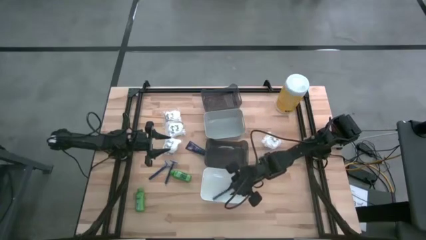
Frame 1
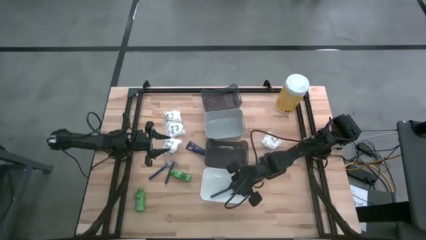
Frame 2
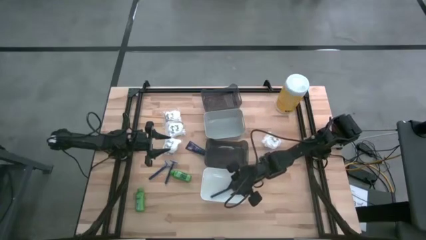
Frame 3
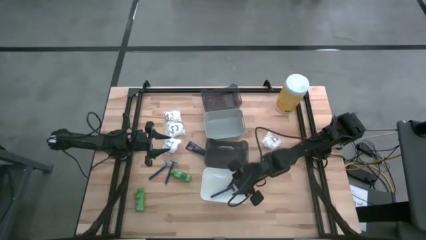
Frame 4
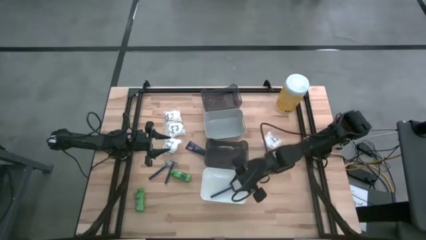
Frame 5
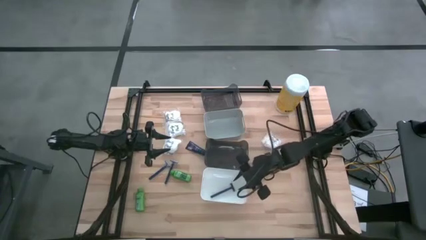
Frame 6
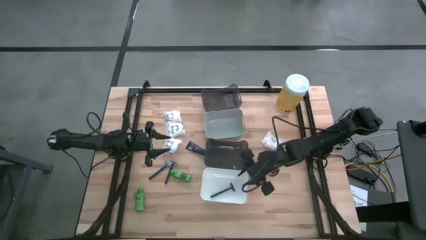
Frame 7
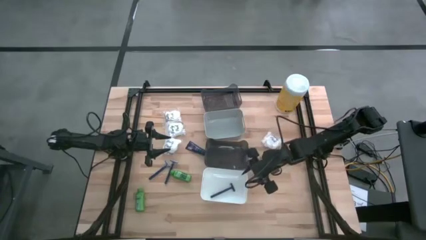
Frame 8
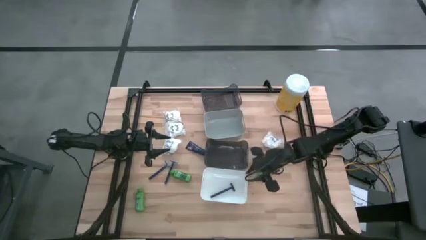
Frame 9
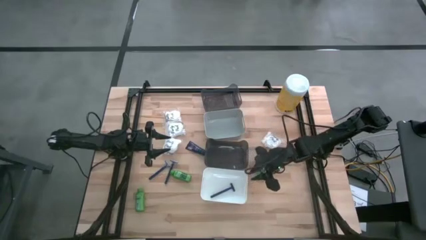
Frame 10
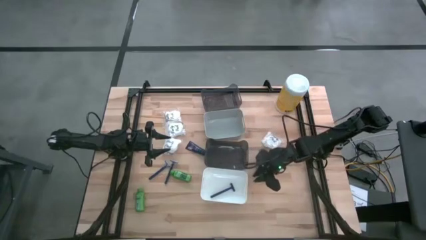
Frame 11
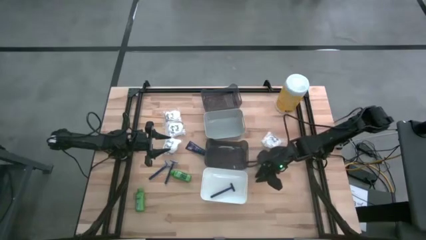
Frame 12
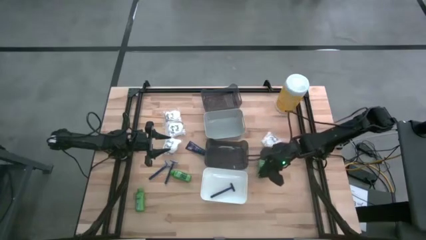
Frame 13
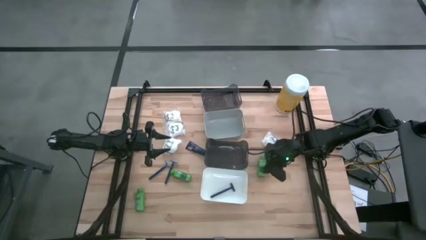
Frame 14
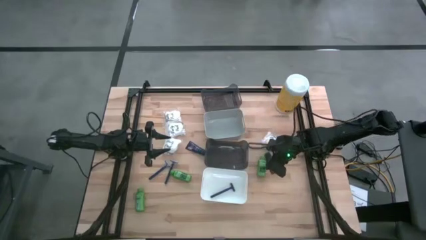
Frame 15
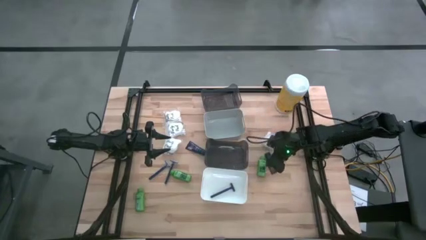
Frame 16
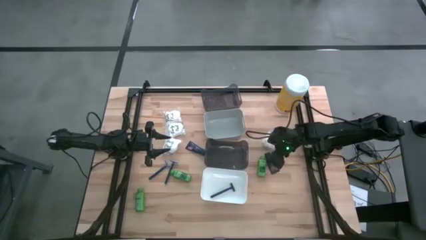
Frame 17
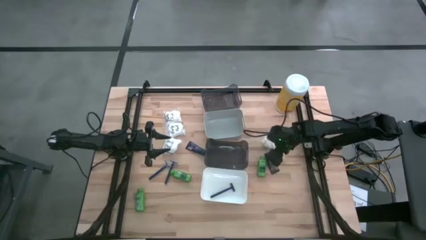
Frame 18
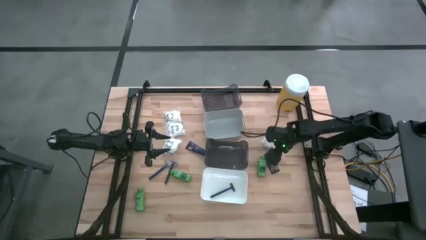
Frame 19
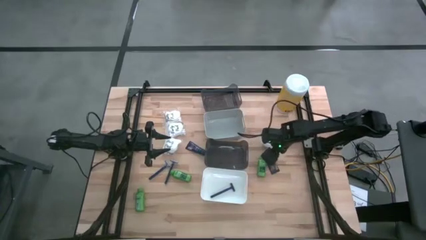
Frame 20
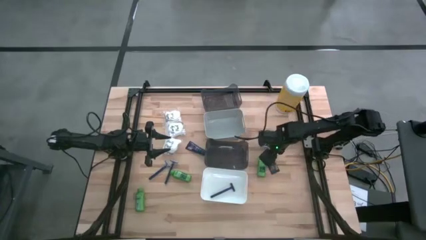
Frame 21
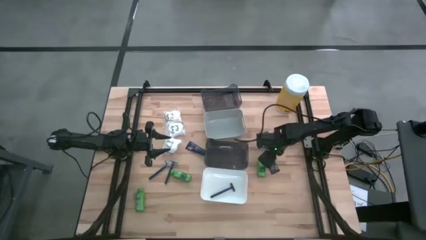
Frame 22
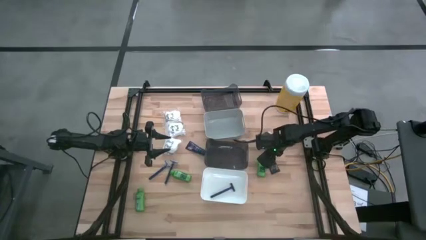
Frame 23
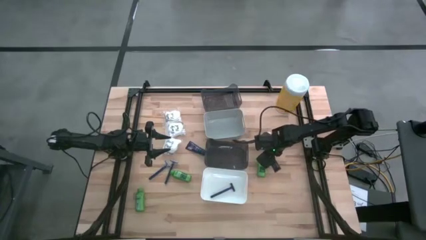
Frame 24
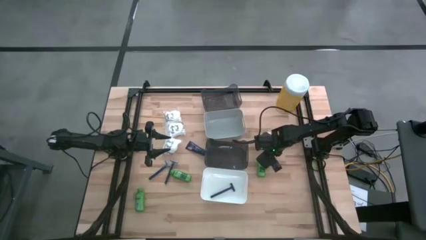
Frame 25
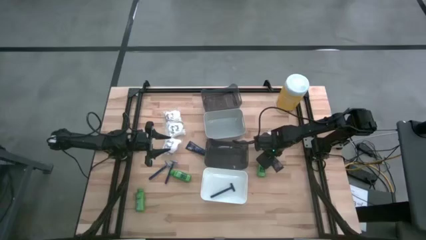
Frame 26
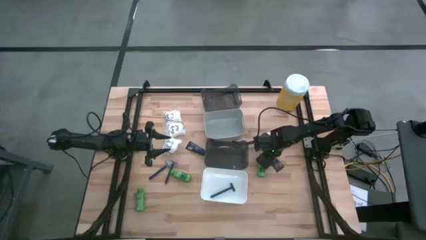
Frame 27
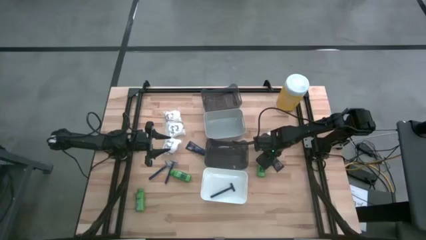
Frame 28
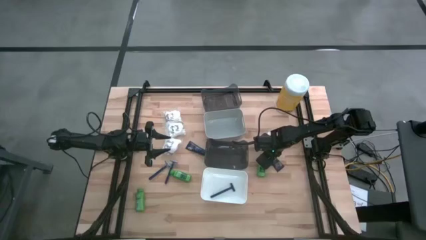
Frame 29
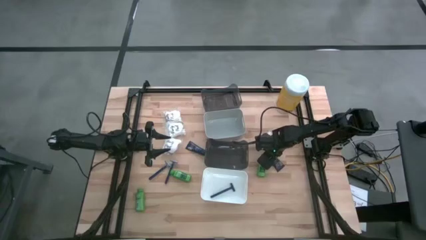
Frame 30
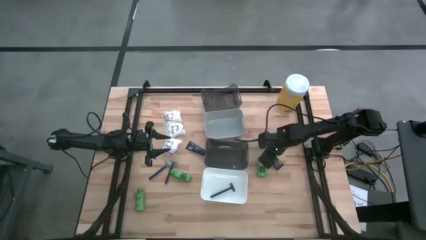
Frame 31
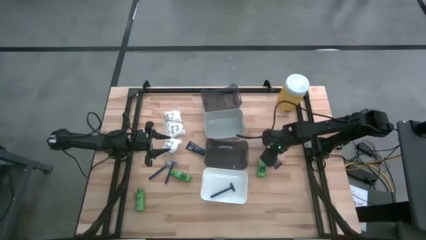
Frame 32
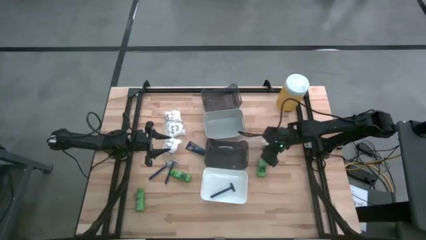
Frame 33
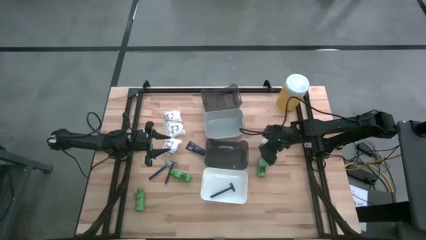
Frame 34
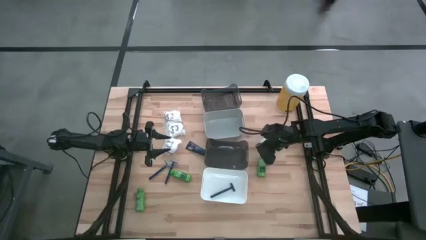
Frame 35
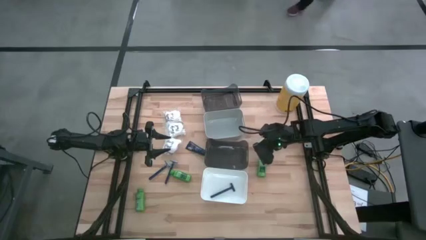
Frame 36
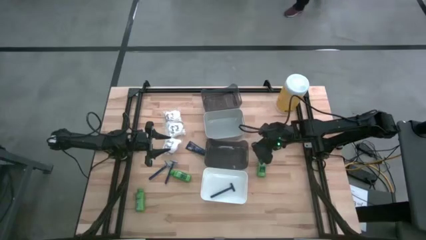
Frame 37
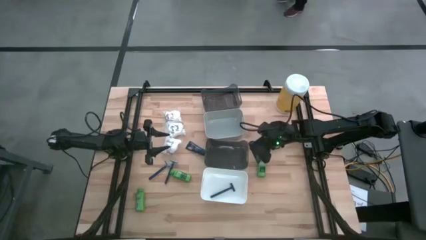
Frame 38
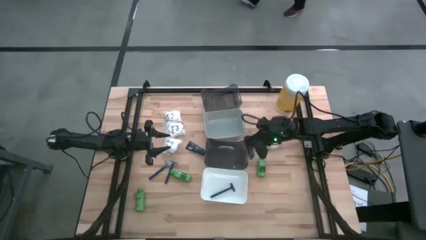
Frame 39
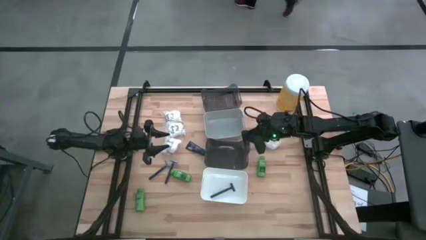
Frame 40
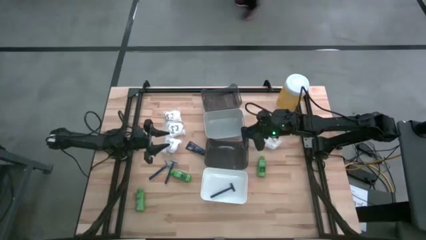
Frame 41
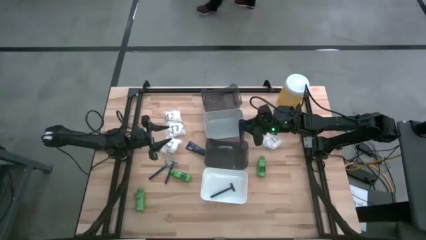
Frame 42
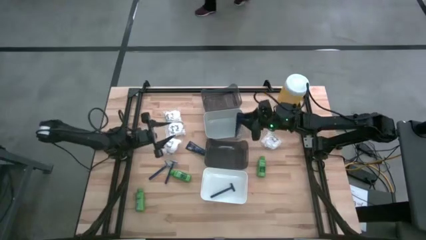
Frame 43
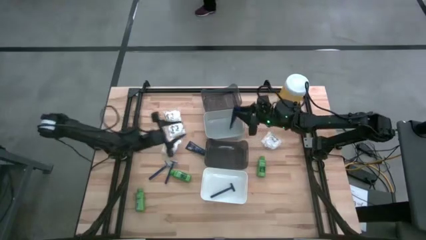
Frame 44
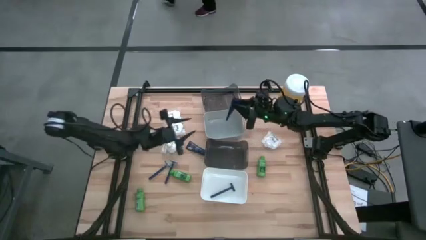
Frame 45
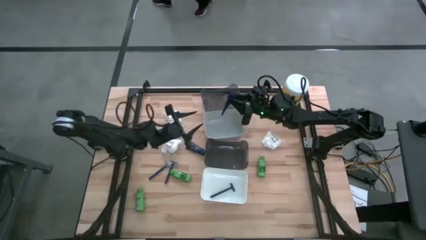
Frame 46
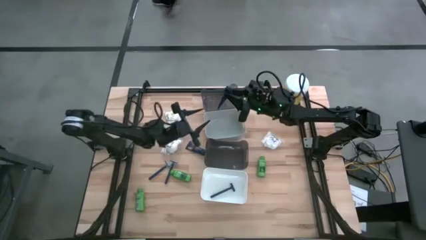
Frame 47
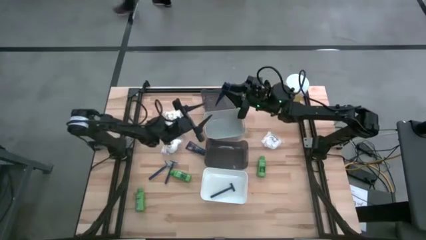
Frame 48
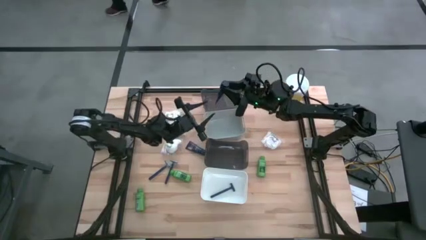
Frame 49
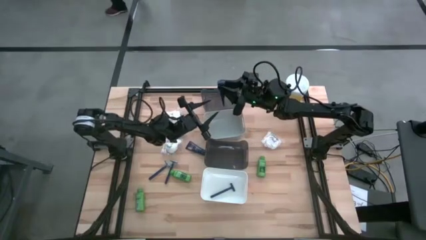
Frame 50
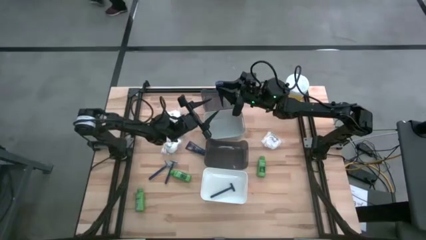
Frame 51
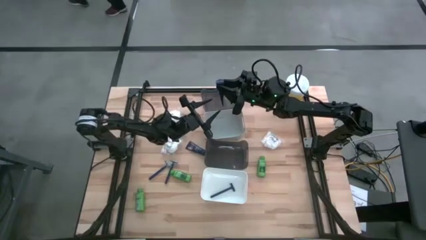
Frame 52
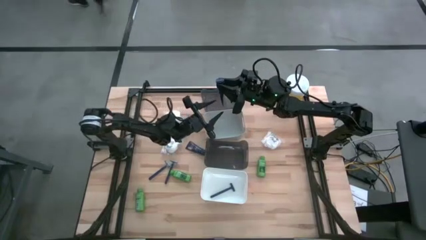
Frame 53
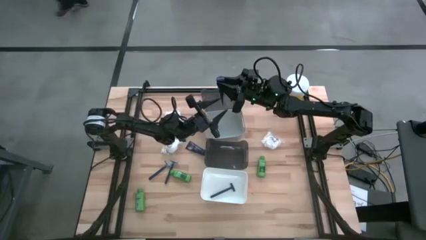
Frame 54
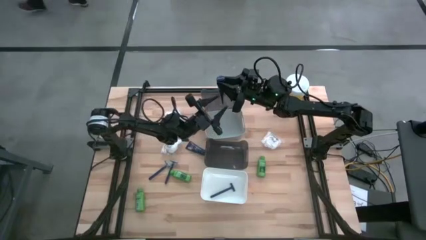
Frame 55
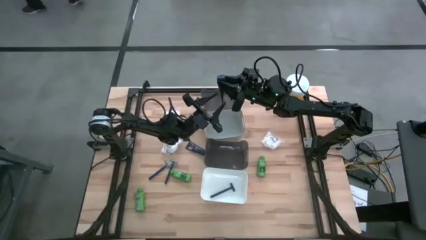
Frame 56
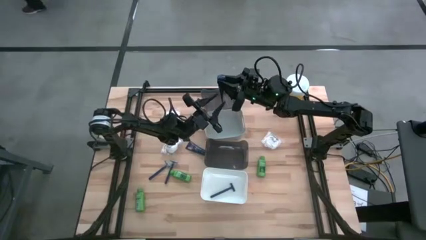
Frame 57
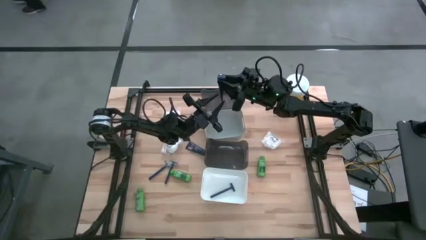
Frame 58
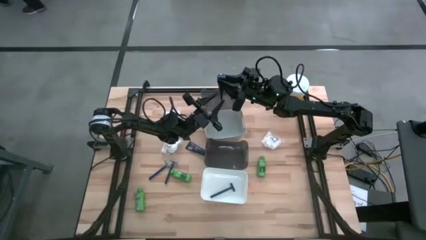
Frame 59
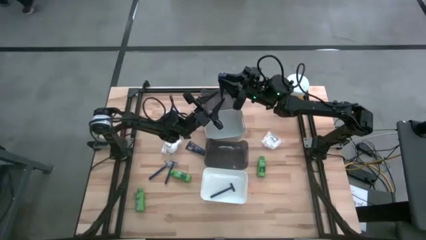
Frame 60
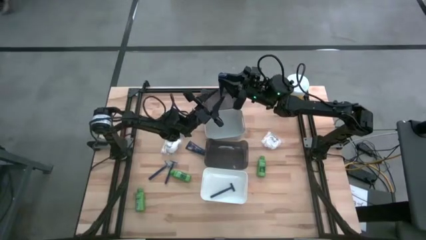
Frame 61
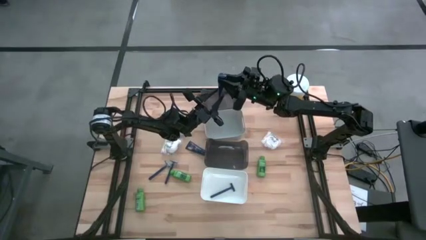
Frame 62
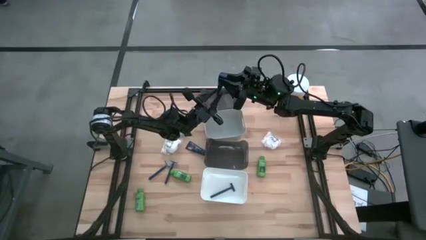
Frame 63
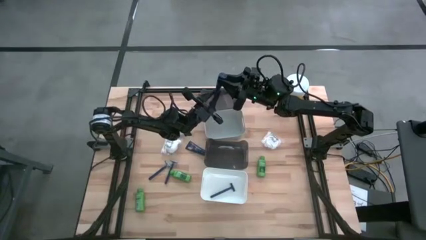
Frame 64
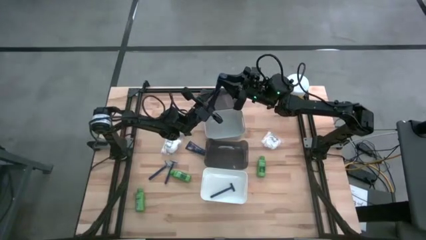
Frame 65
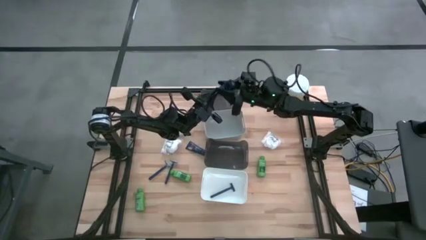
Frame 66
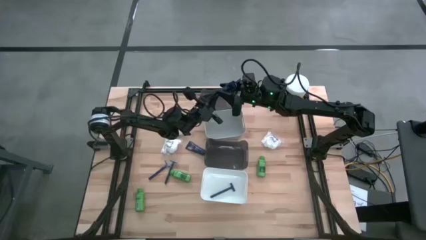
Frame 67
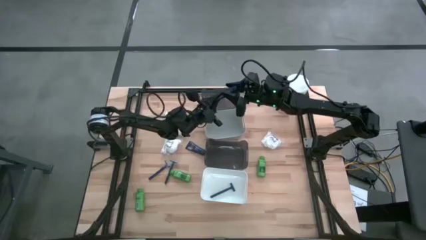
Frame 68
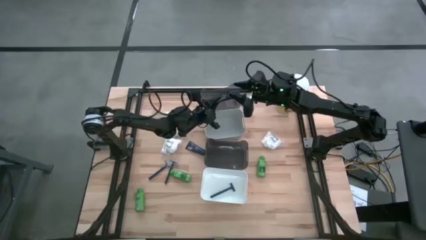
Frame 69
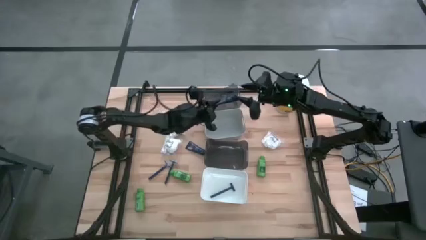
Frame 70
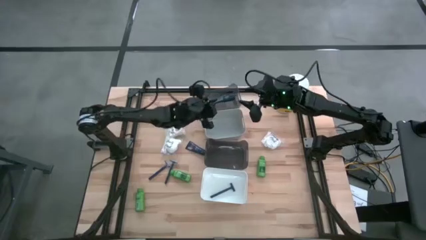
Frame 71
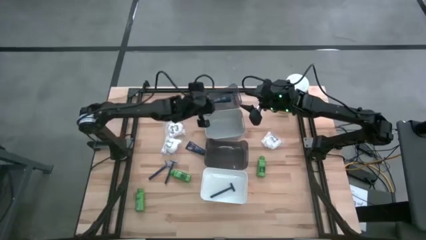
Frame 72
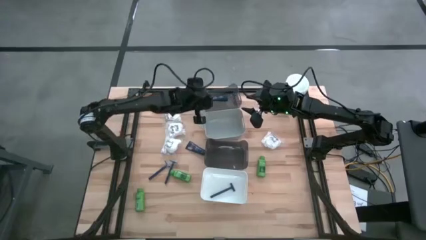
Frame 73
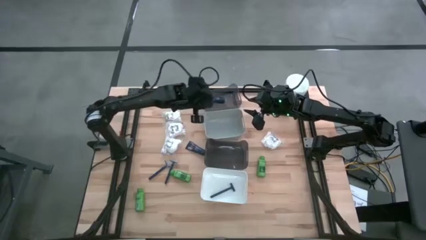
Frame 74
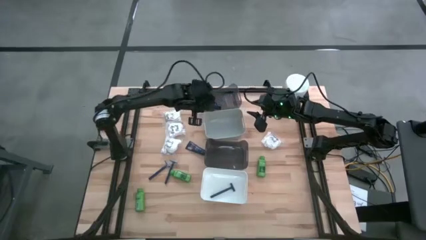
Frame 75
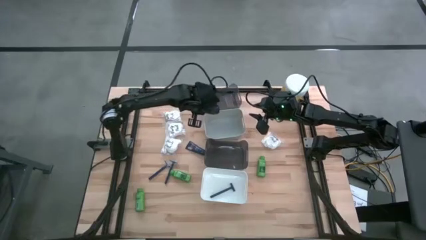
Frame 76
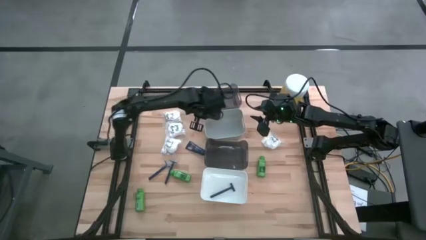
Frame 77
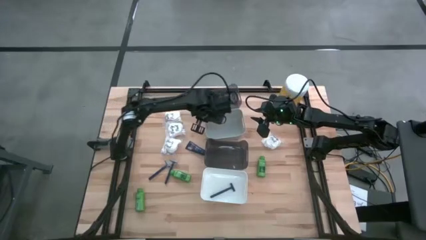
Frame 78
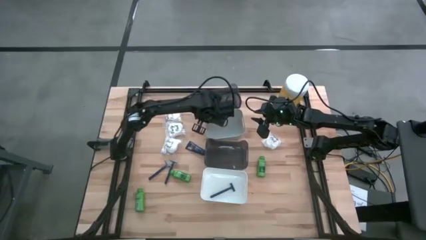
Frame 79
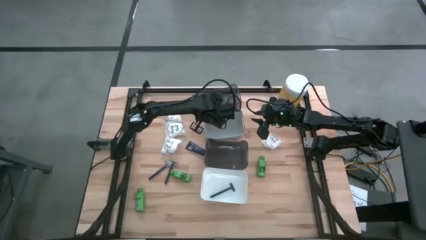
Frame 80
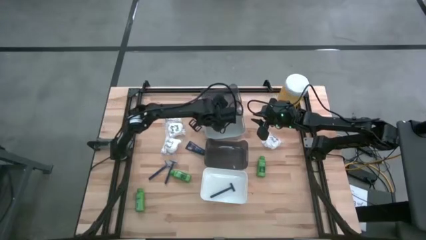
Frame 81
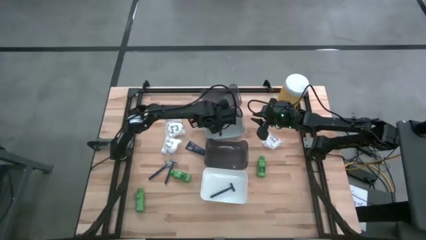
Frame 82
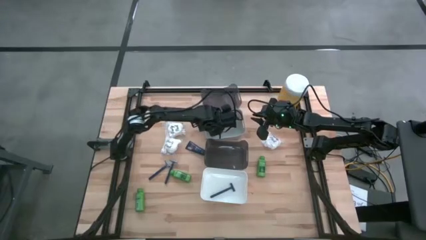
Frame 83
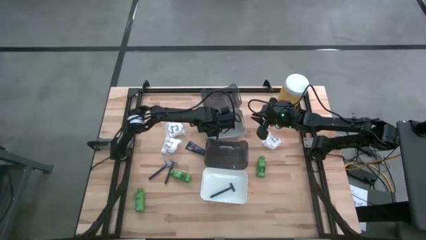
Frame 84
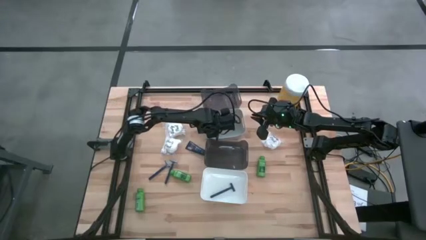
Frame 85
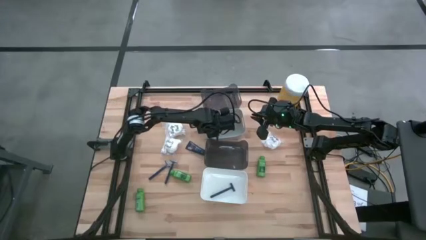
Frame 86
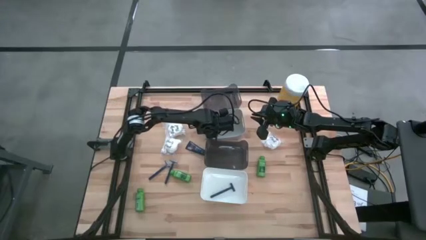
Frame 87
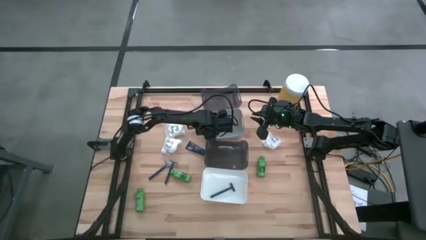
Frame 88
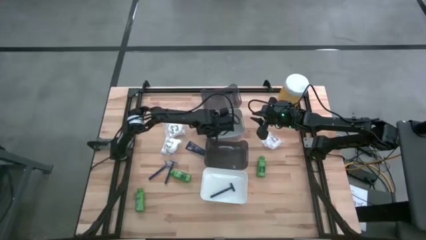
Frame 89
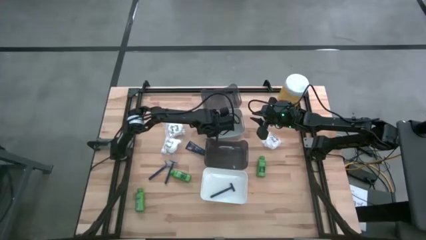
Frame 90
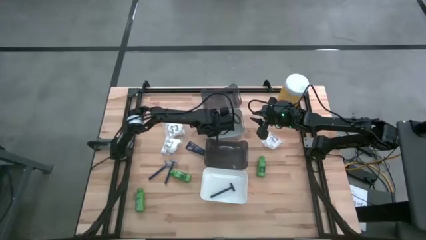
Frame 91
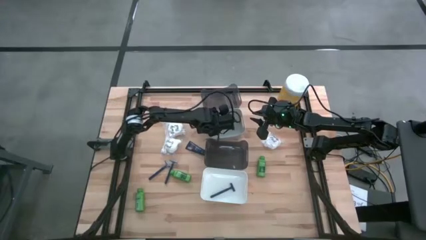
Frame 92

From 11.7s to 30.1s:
Task: Pick & Place Travel size toiletries
Put the right blue shave cream into the gray bin
